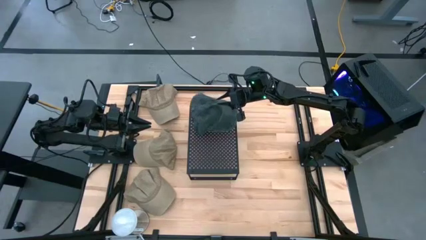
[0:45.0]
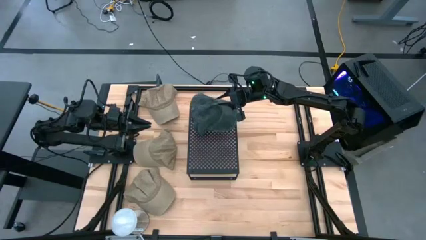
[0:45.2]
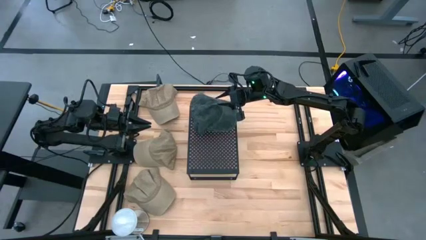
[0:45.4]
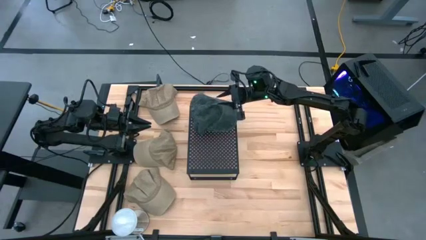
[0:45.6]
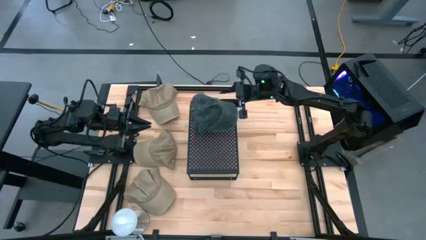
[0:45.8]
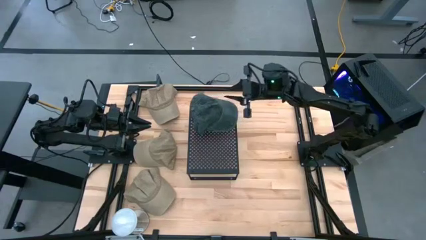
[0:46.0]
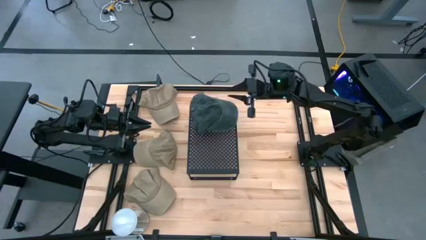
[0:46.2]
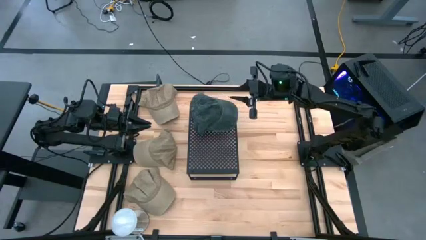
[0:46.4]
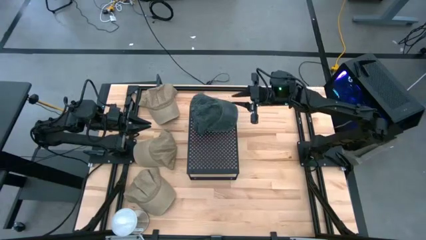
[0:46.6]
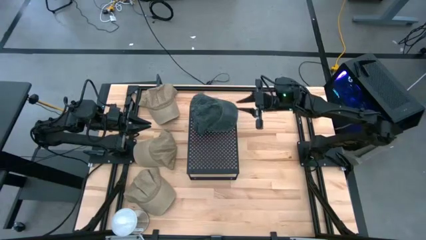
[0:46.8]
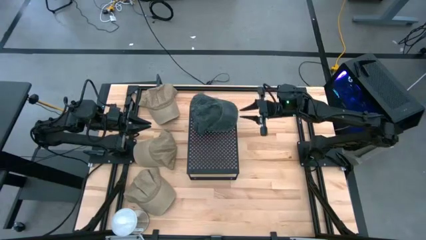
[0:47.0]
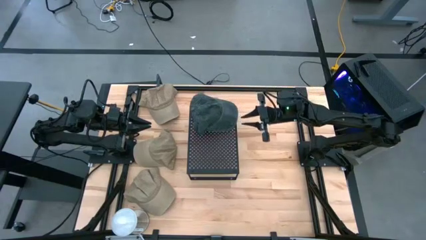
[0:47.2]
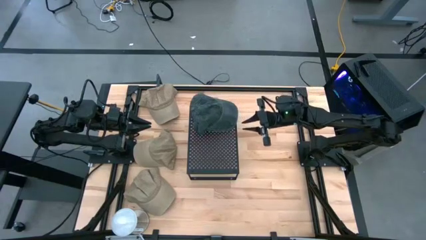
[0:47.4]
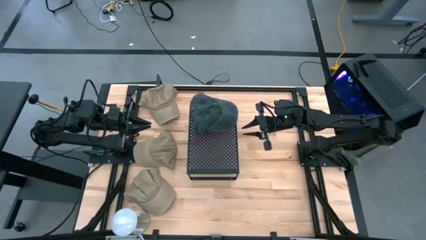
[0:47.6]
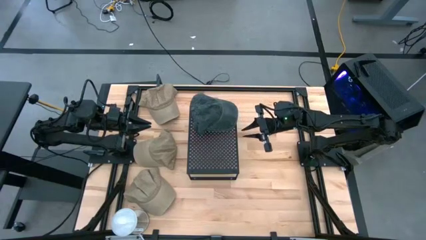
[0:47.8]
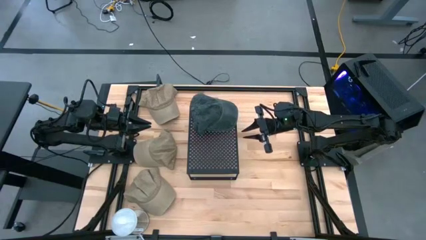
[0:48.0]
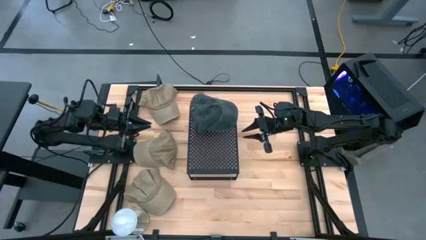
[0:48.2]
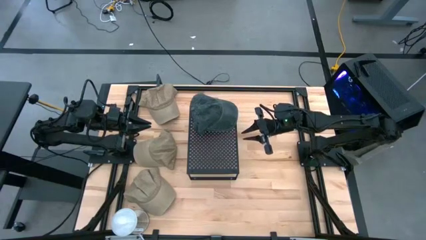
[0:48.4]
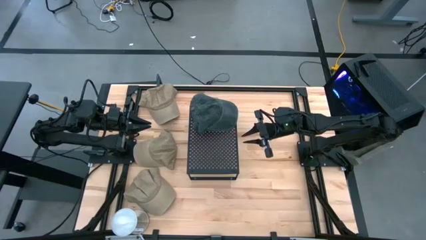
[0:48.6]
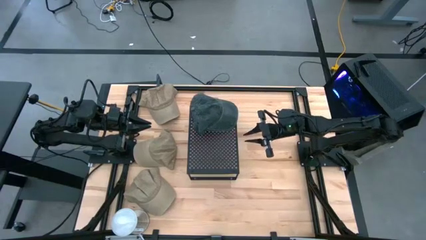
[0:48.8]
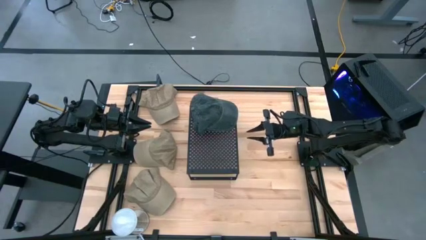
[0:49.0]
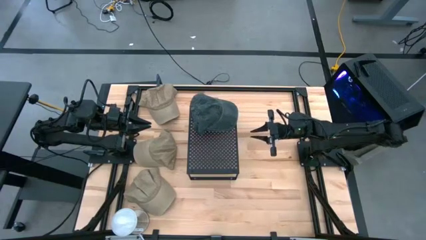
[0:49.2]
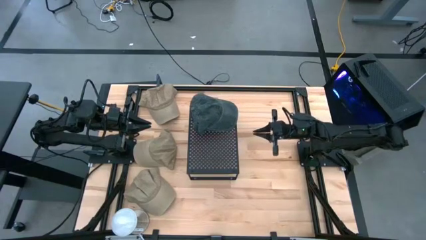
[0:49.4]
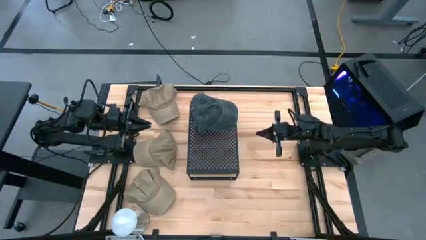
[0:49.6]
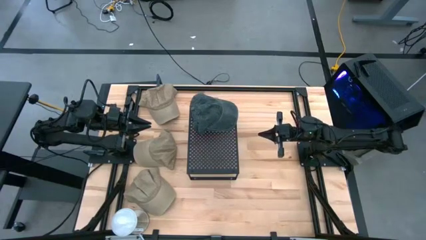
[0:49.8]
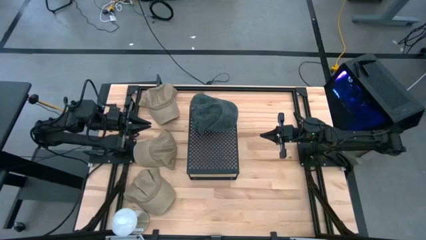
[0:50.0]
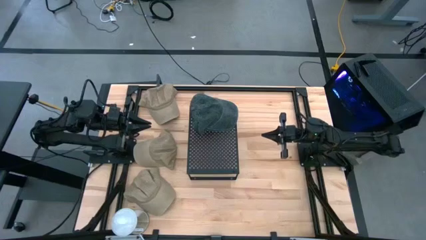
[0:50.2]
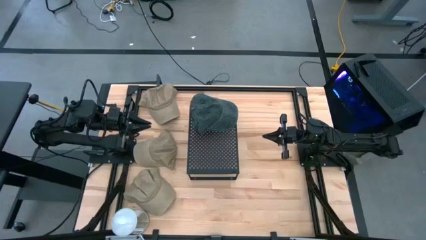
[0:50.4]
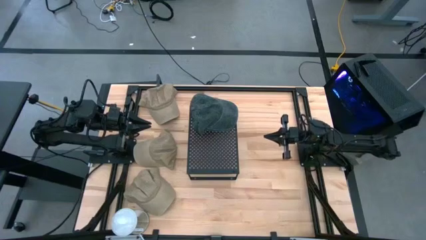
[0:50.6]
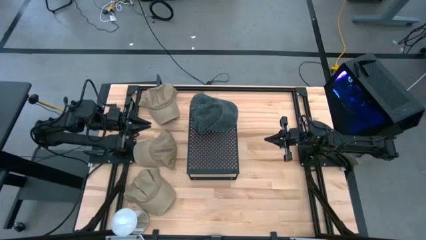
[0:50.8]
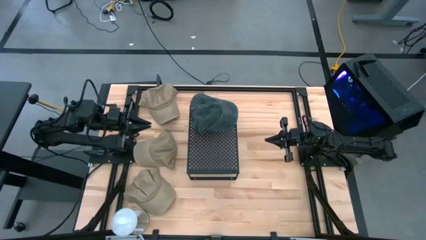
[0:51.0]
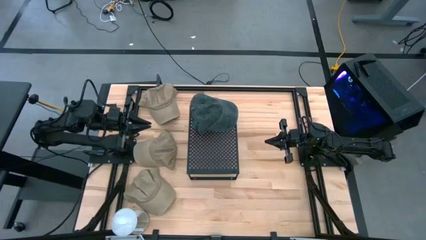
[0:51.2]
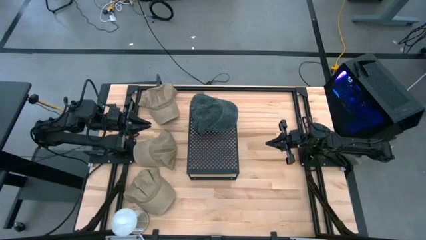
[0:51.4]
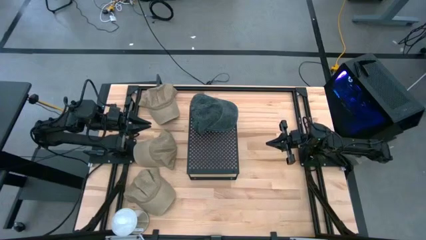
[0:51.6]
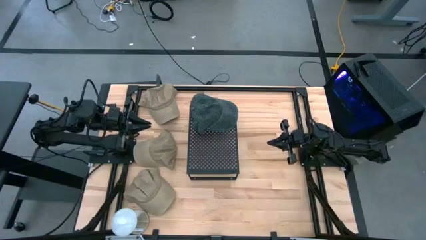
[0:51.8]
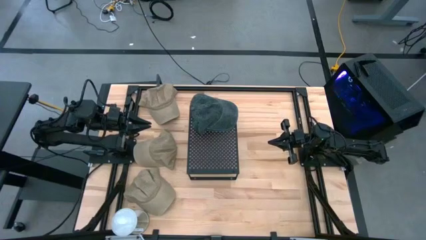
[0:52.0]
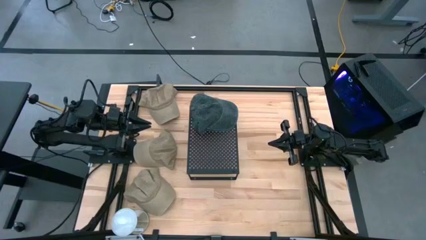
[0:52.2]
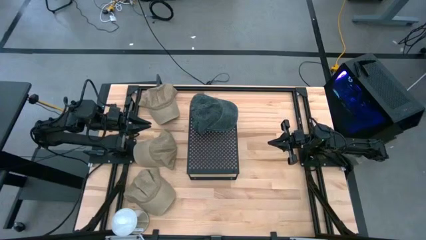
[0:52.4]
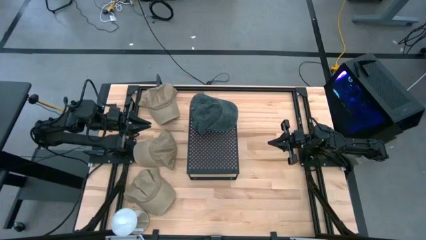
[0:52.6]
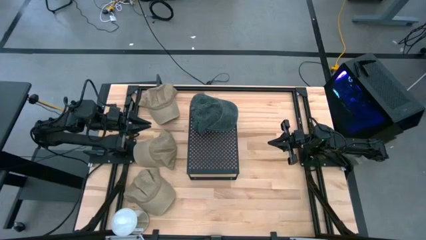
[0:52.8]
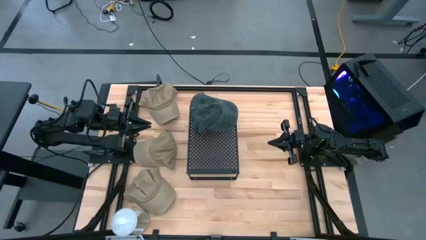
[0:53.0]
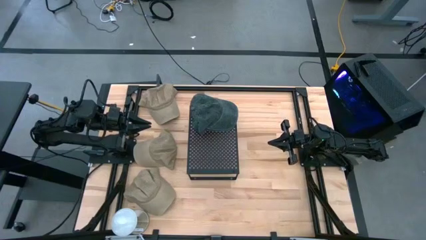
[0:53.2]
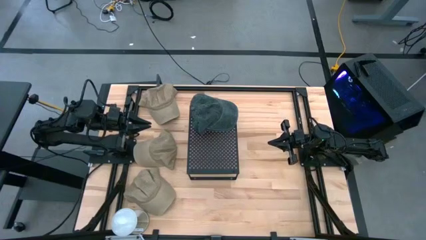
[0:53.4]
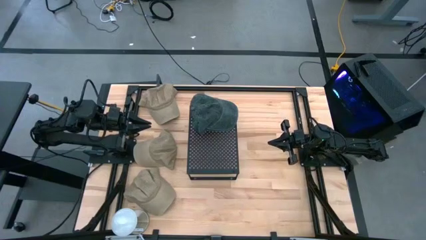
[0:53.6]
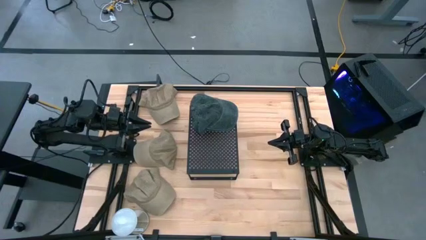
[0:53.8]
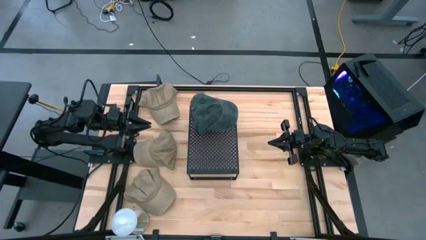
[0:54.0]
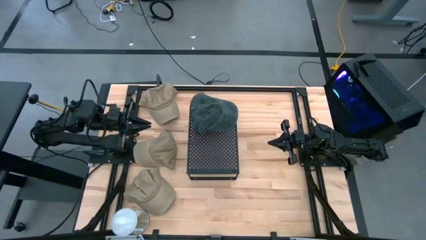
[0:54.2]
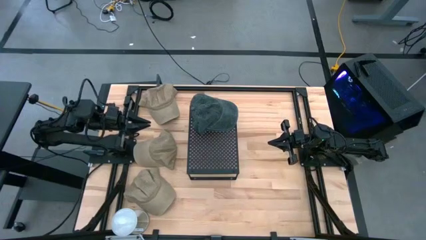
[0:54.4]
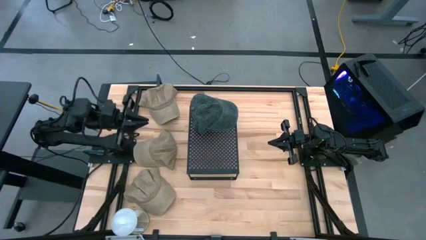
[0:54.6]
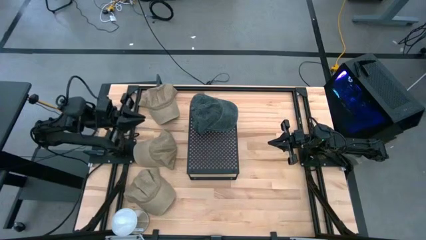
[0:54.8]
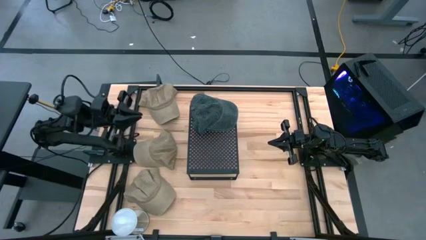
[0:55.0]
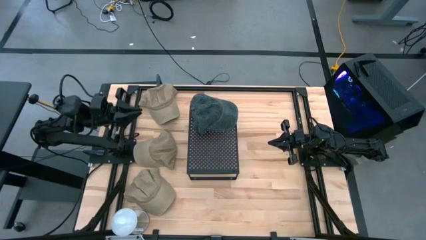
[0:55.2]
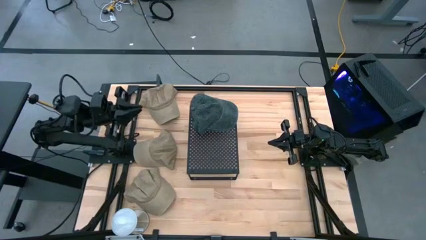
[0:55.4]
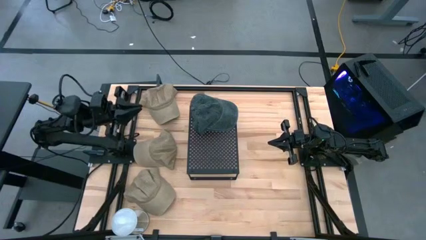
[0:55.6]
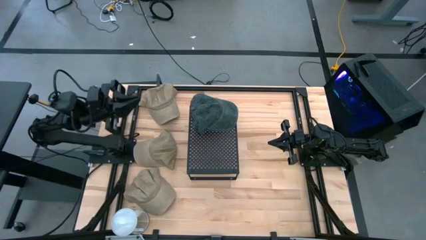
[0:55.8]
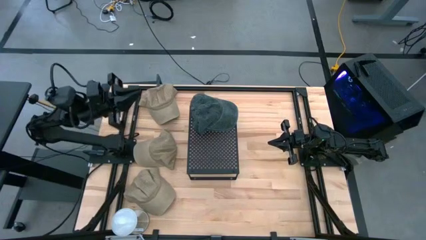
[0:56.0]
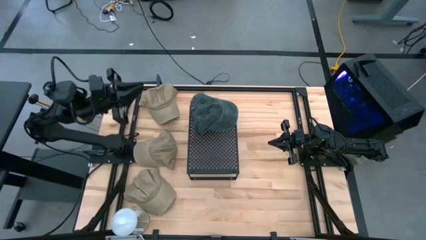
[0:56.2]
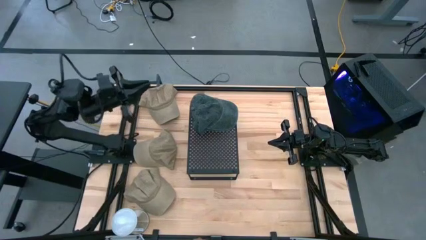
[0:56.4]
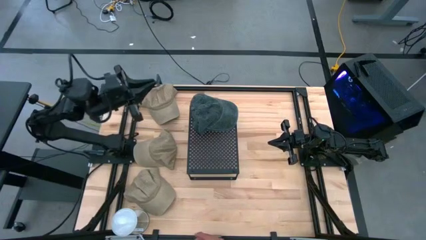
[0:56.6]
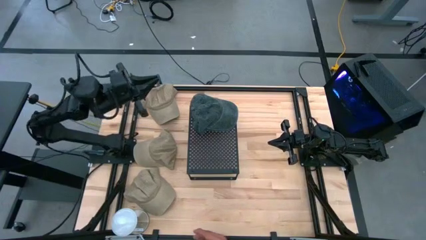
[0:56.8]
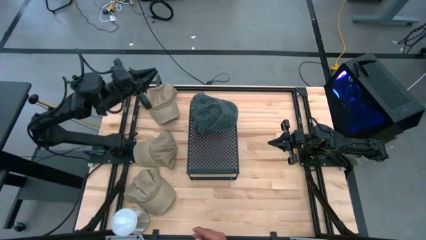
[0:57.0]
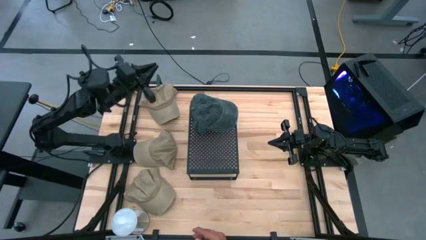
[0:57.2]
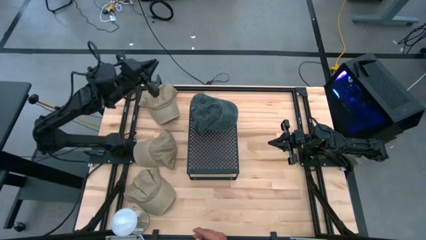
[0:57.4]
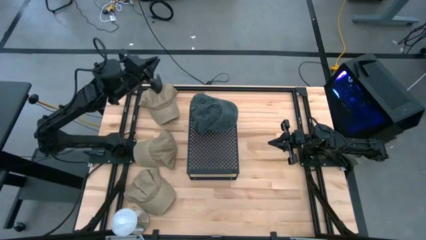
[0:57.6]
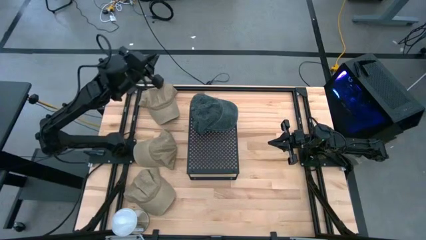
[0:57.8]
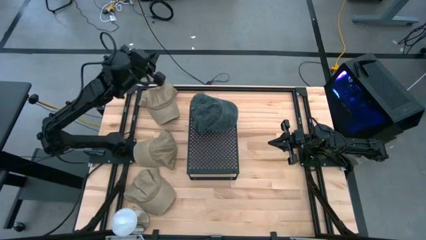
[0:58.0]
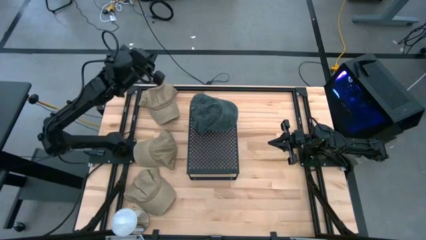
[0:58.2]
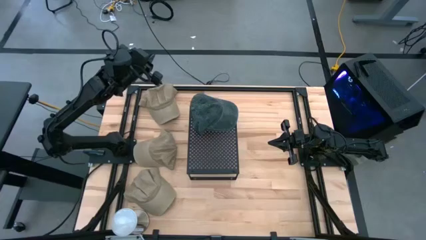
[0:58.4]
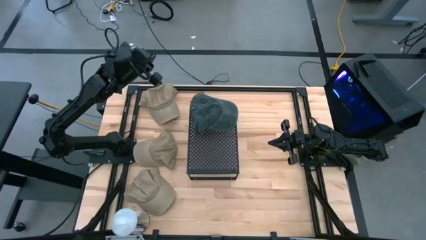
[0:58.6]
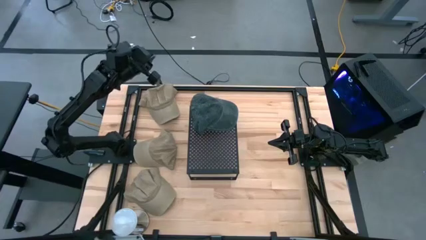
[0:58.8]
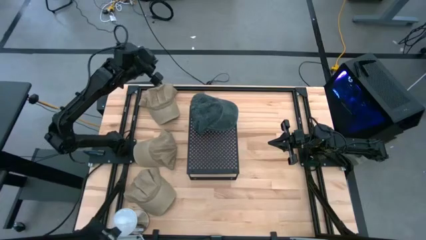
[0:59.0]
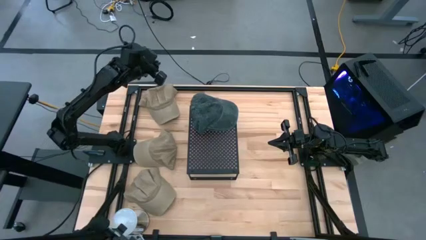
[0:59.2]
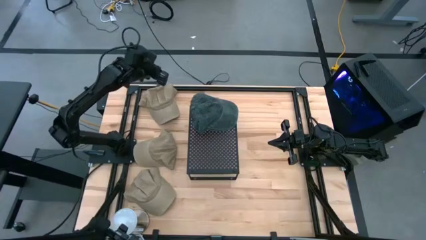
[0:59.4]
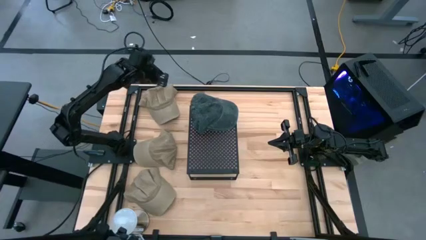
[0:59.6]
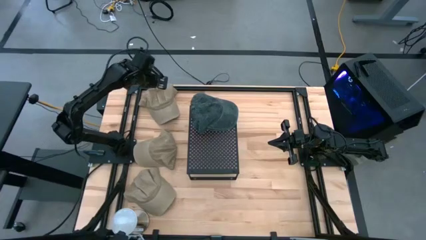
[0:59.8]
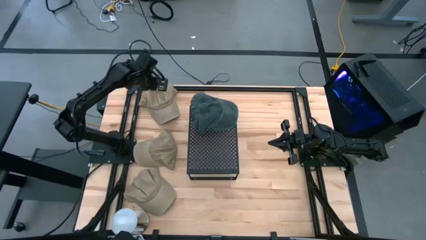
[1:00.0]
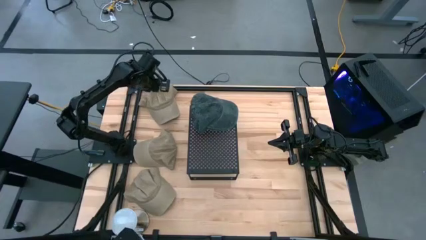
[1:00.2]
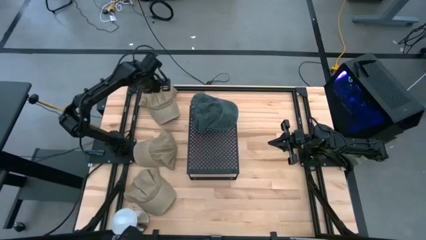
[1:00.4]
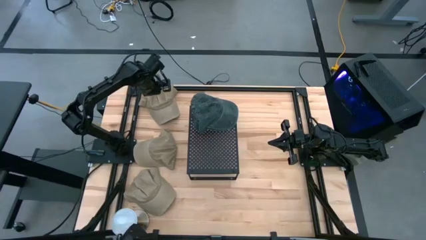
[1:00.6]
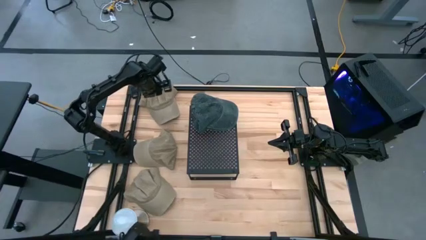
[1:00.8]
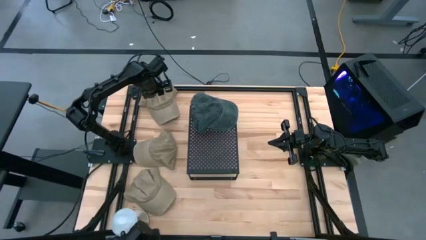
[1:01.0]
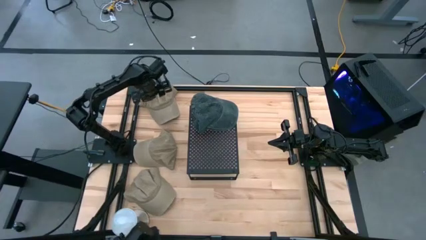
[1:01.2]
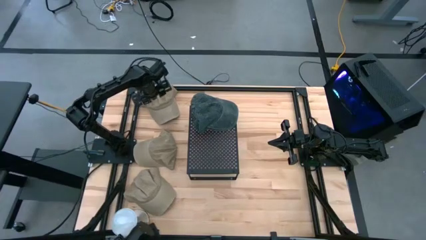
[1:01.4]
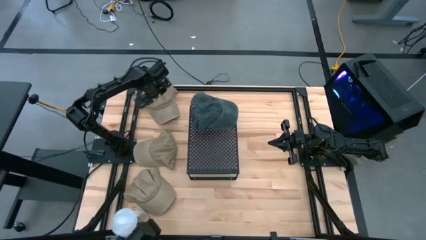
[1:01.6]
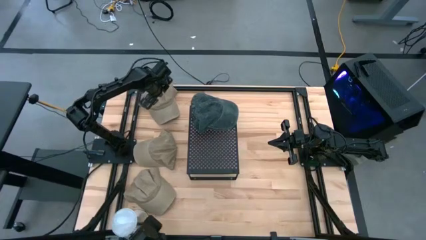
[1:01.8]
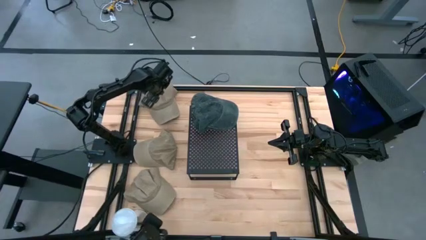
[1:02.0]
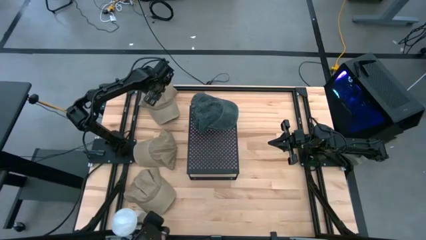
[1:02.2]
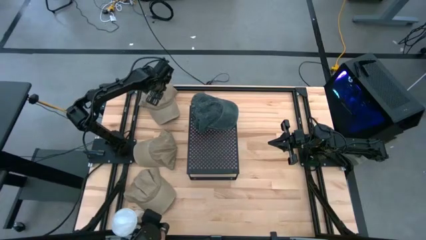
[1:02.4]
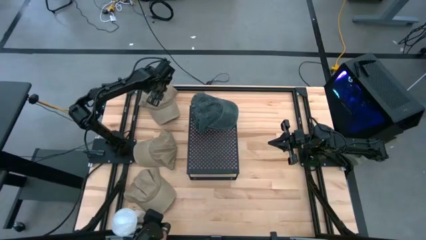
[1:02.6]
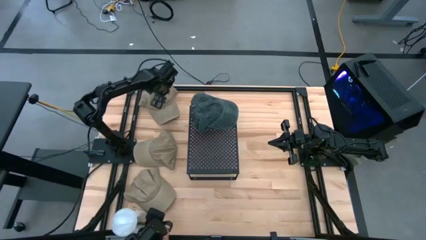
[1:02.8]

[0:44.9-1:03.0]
Task: Pick & Place hat
Put the top brown cap on the shelf
